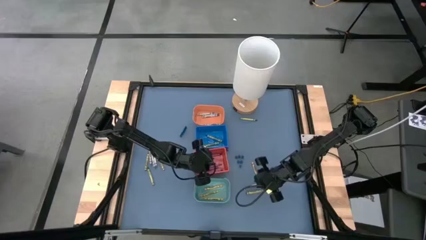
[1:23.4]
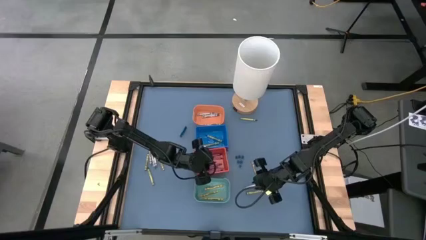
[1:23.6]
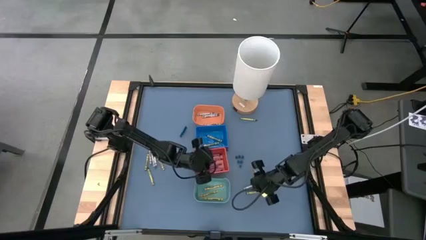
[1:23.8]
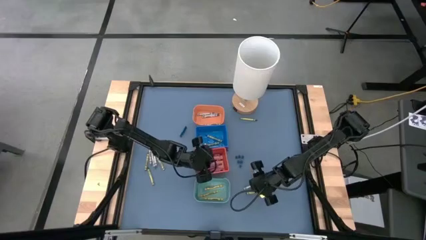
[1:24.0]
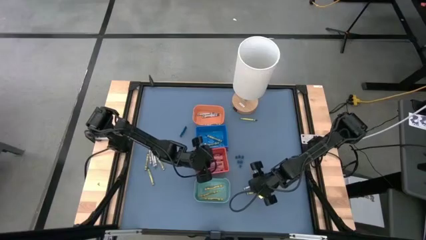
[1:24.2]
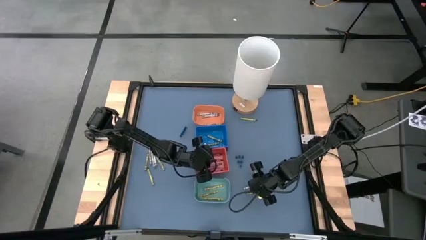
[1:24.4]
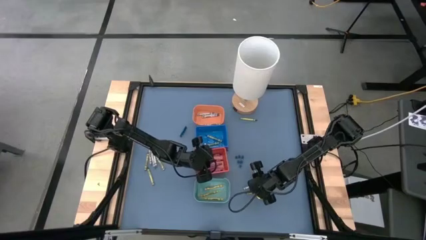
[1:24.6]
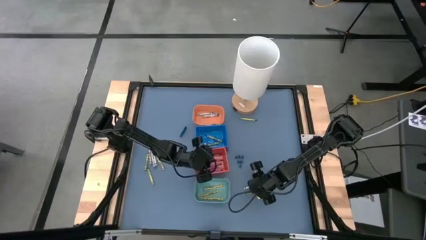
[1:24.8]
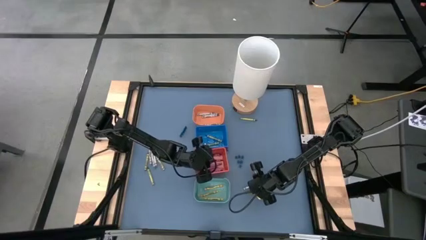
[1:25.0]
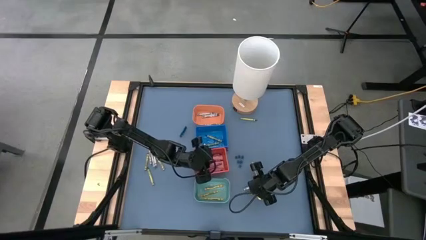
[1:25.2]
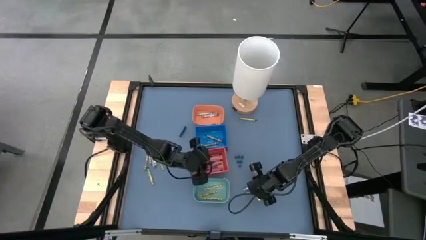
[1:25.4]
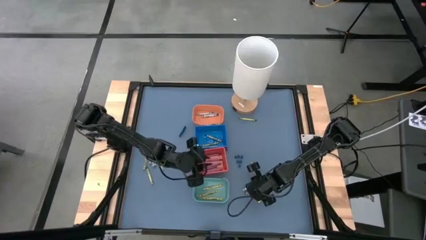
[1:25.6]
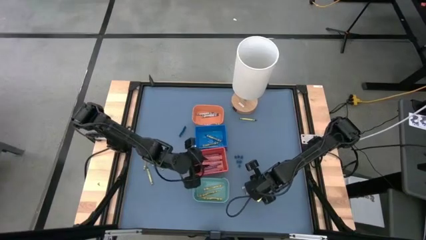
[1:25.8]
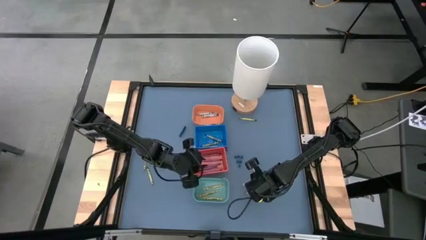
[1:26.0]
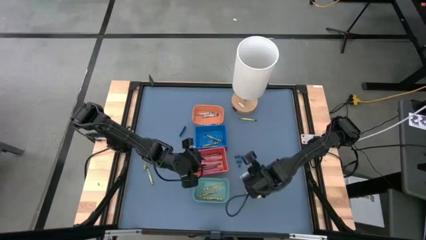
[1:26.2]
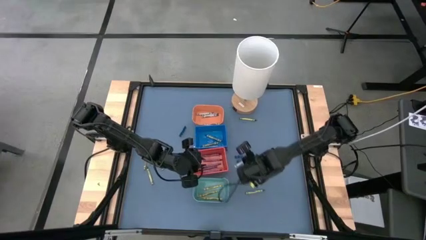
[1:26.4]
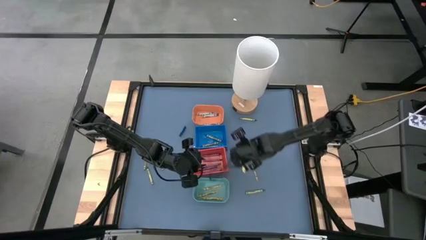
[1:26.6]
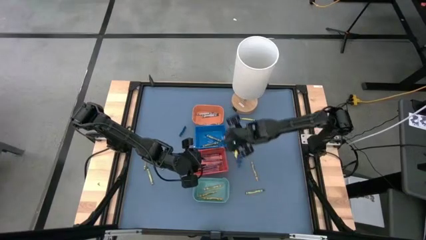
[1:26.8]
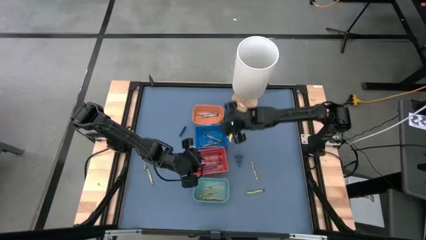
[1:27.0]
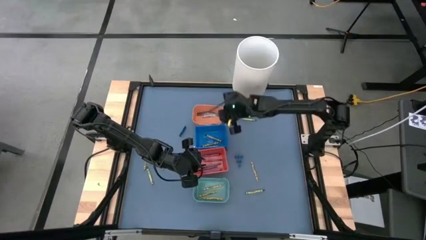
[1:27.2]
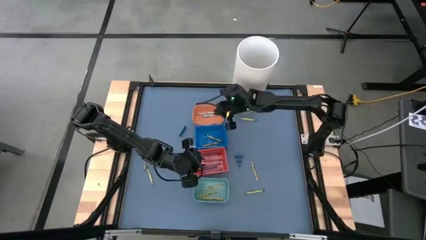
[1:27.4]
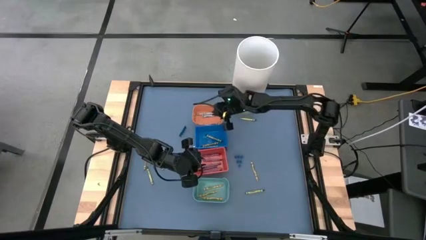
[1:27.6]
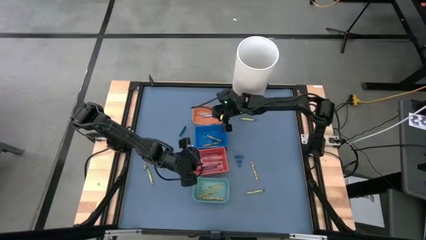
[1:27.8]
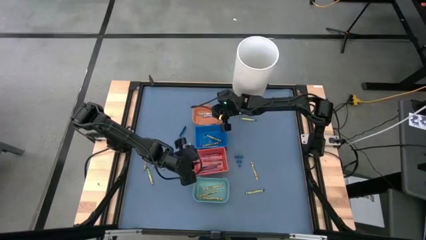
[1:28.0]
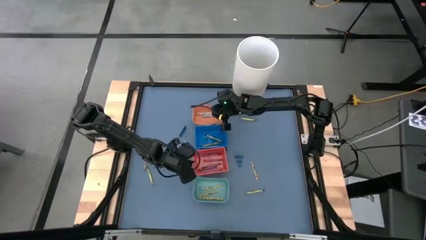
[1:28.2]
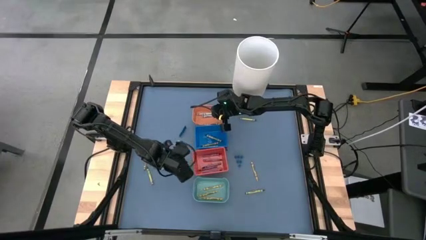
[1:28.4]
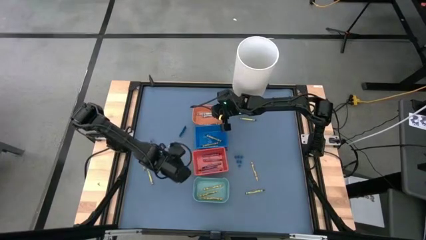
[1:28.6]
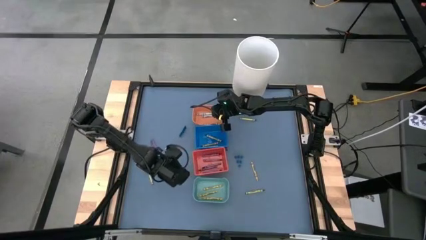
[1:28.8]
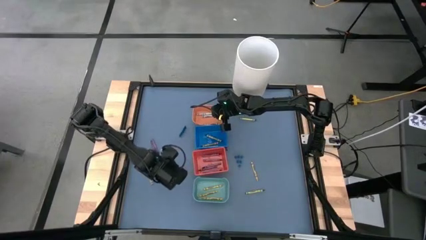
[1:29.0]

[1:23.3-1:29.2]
Task: Sort crayons
Put the gray crayon into the orange bin

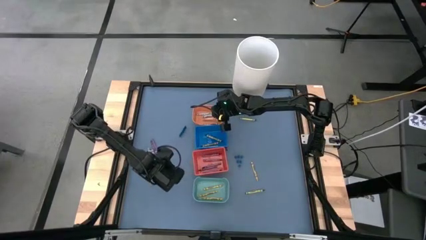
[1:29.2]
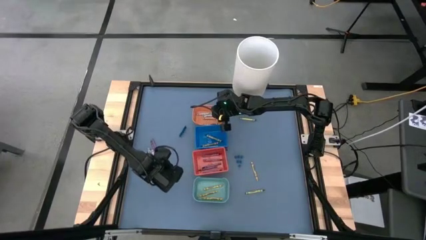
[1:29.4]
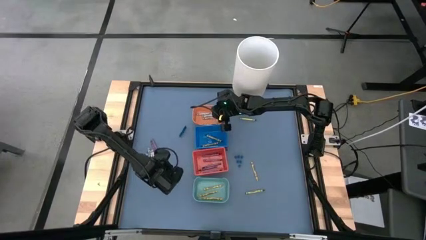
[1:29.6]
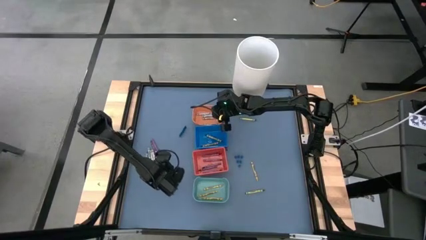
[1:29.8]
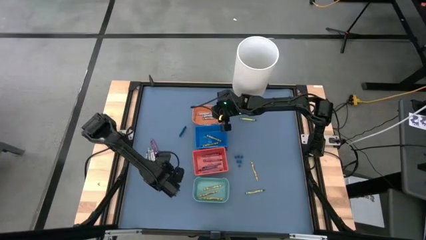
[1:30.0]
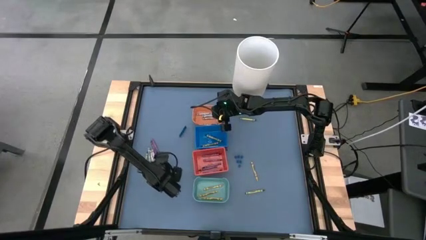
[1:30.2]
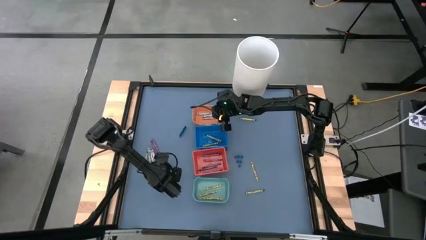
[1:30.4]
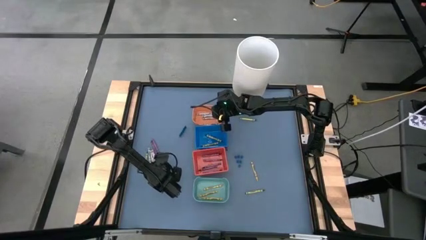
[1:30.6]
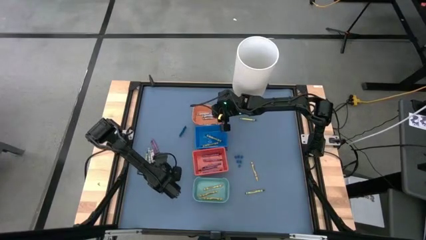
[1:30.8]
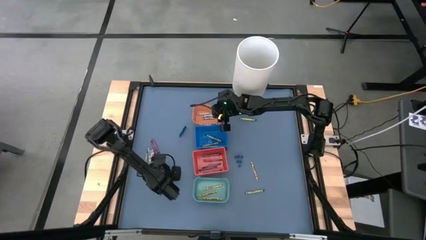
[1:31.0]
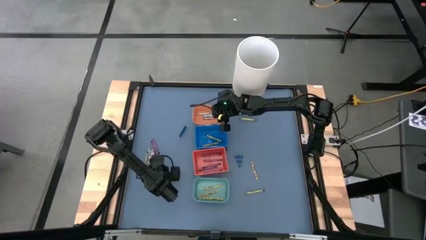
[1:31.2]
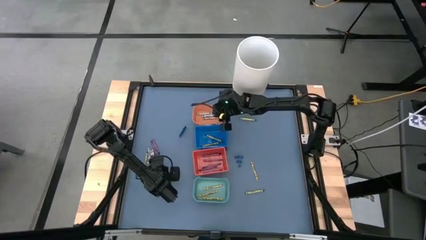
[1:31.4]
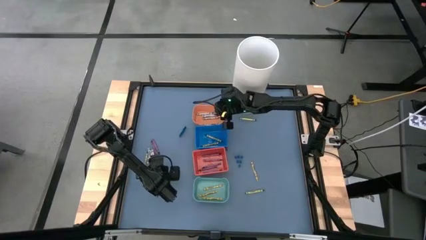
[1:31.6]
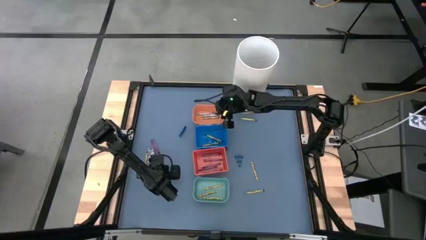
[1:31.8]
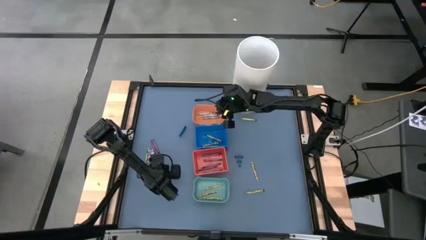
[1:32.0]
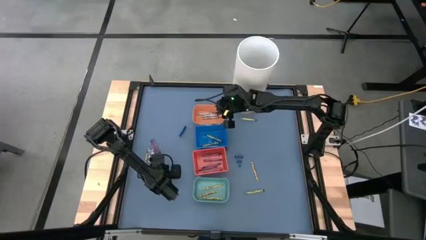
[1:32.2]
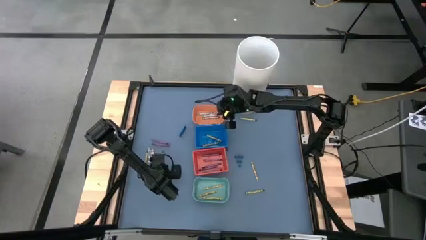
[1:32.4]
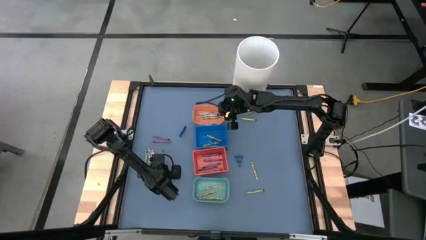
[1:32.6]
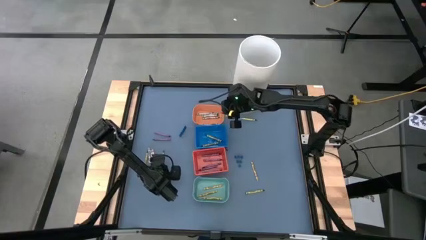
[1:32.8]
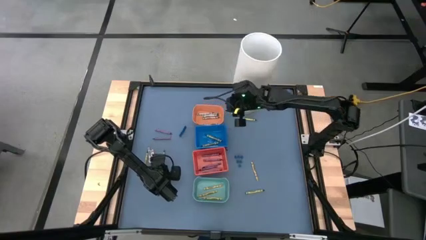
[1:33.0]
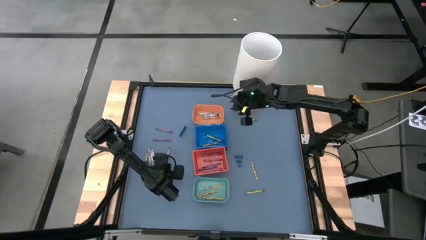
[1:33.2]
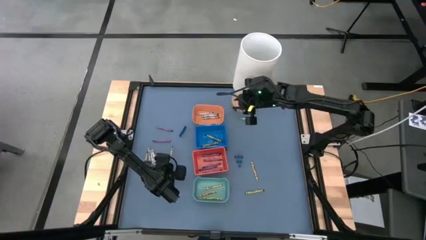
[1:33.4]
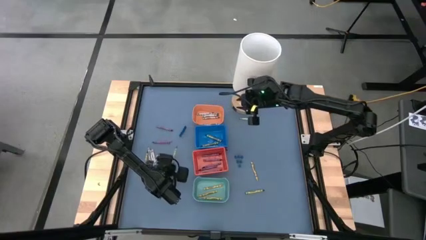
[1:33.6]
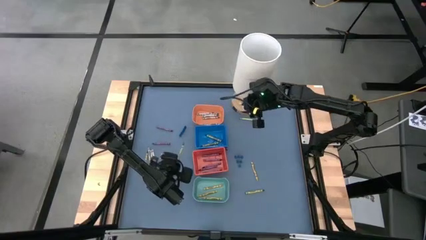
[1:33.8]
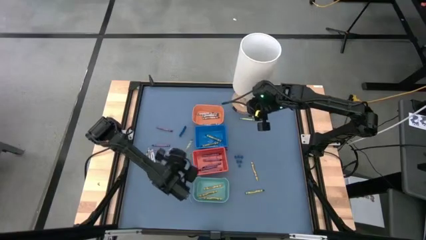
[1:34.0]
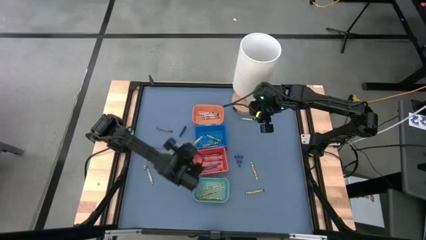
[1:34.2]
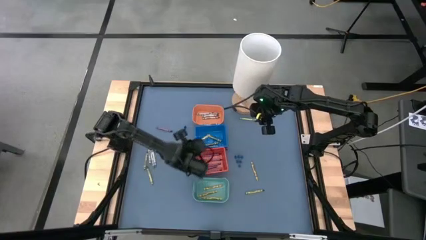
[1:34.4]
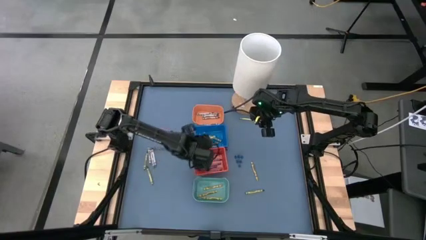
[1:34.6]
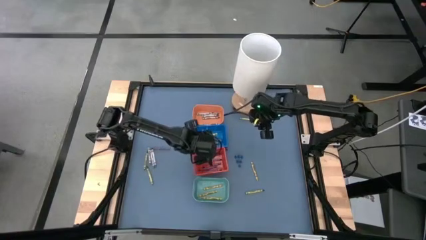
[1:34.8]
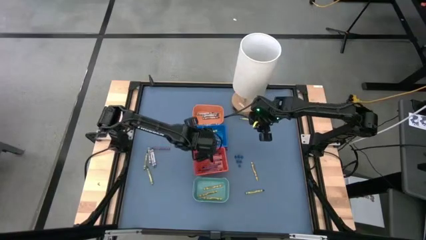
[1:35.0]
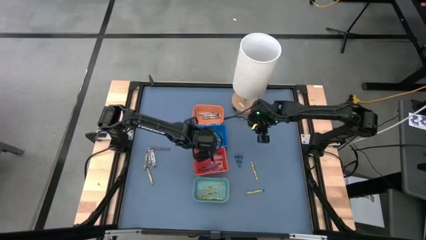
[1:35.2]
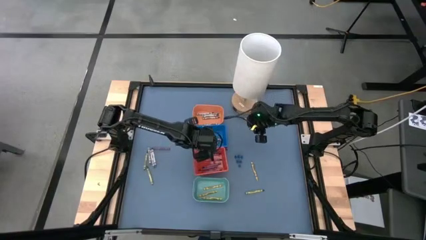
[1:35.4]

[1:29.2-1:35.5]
Put the green crayon into the blue bin

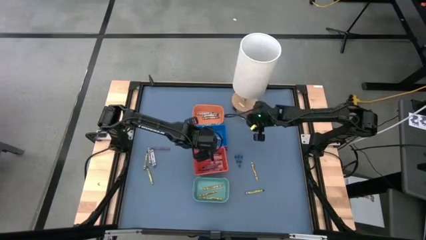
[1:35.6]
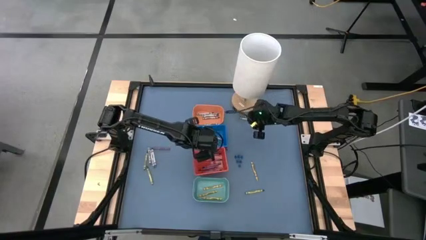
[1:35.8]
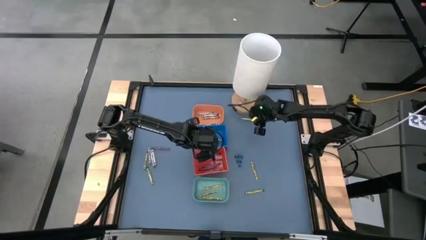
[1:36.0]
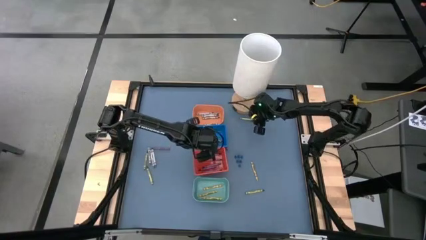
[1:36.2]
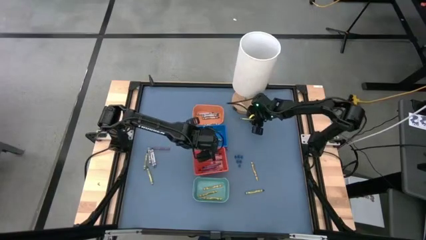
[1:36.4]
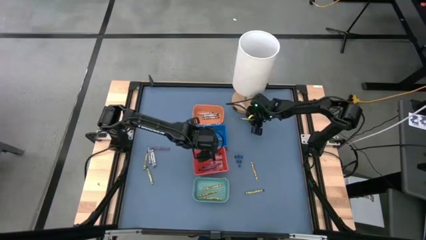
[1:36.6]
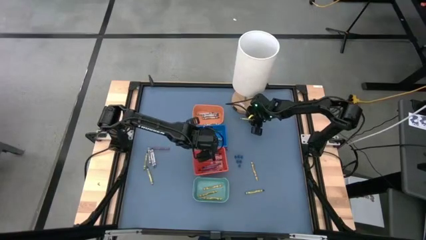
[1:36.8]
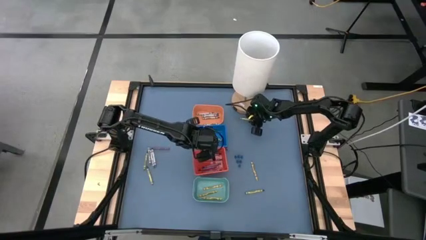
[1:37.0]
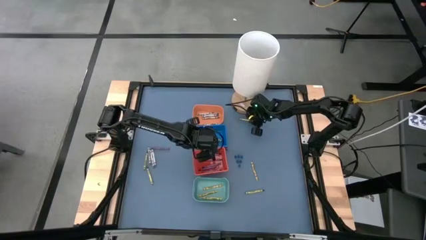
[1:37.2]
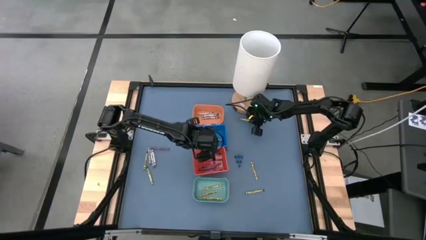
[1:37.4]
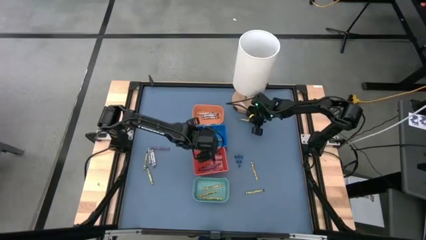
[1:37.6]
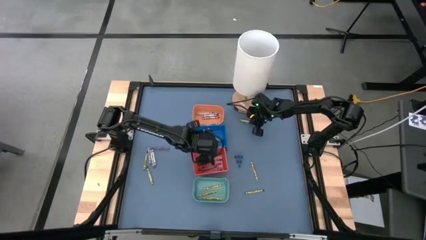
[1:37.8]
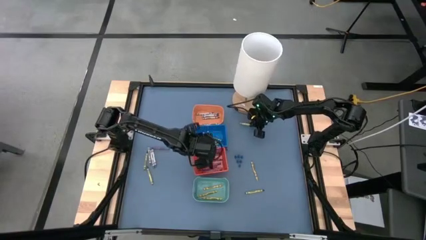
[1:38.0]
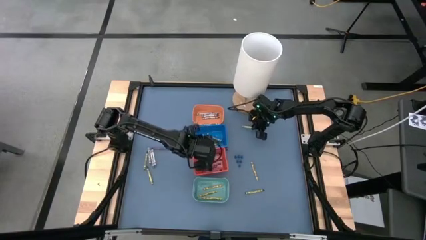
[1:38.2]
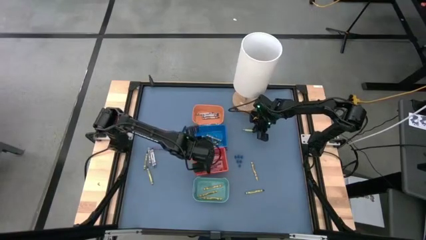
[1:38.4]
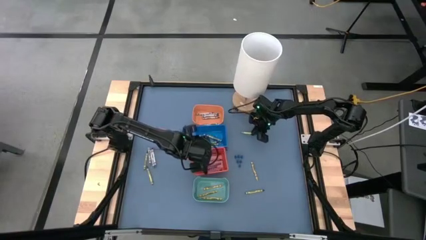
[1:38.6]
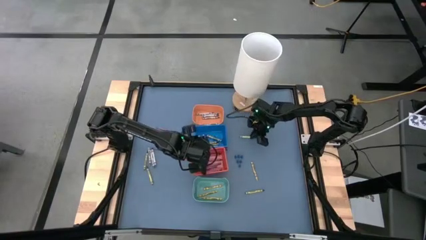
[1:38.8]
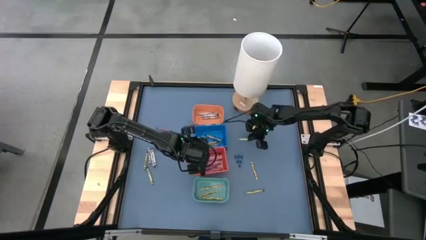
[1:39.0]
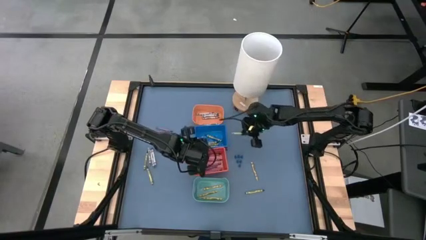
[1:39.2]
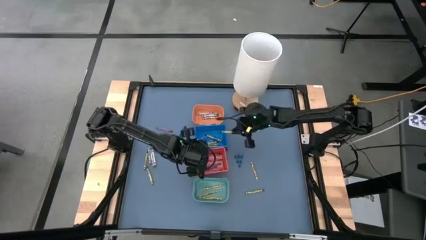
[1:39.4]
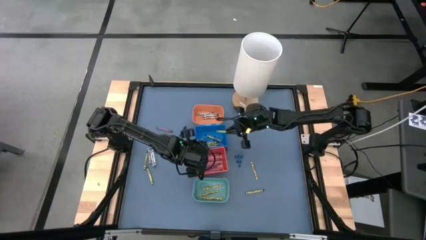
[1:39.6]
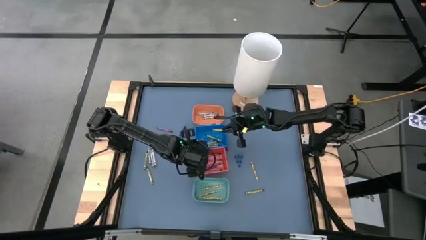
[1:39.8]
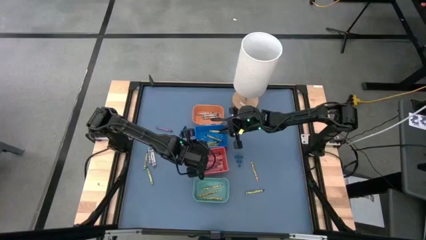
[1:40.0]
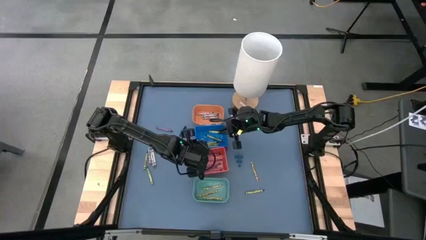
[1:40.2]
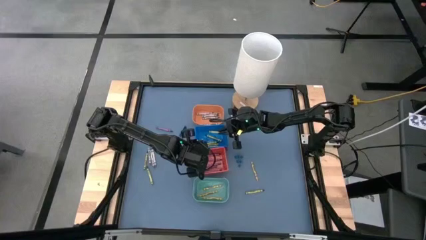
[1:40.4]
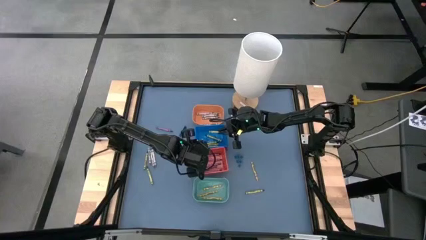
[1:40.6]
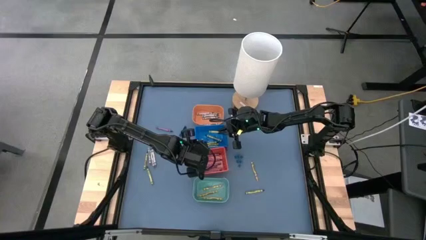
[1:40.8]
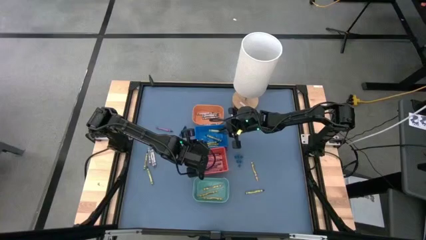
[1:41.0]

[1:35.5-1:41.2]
Put the green crayon into the blue bin
